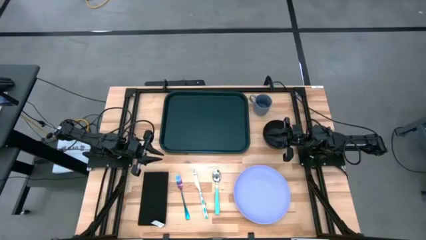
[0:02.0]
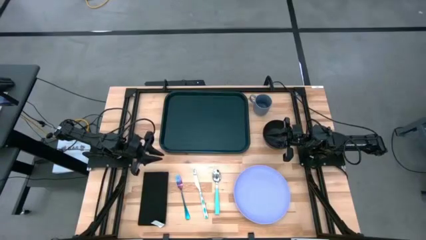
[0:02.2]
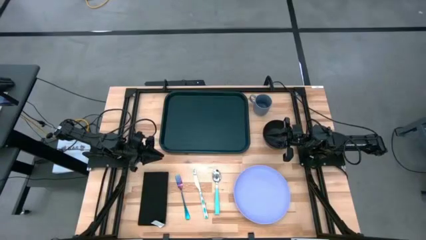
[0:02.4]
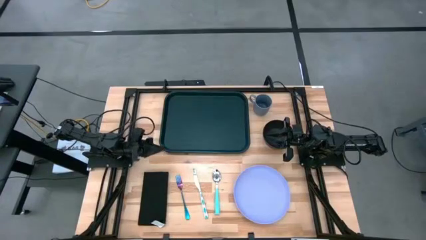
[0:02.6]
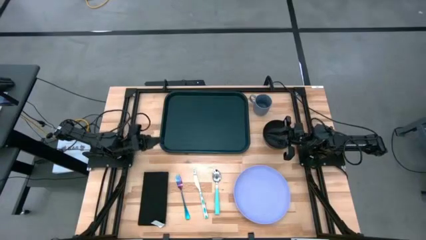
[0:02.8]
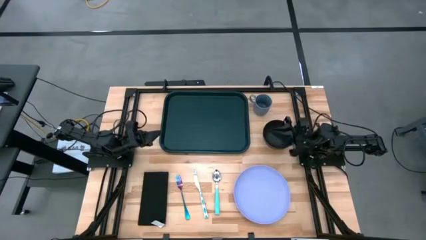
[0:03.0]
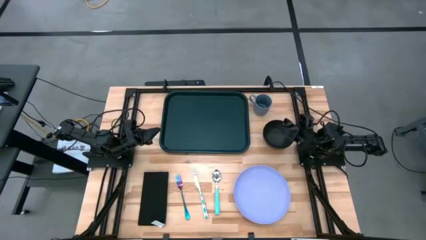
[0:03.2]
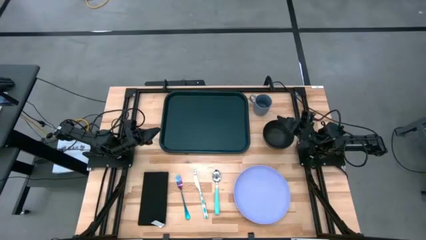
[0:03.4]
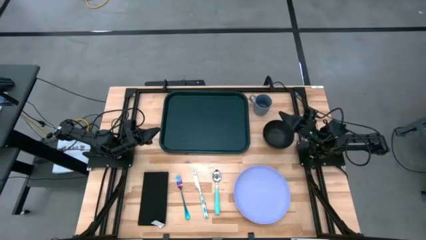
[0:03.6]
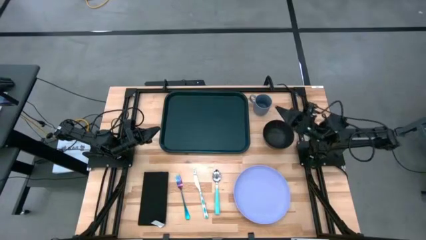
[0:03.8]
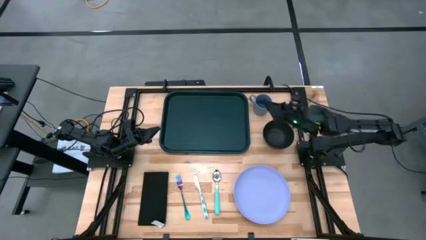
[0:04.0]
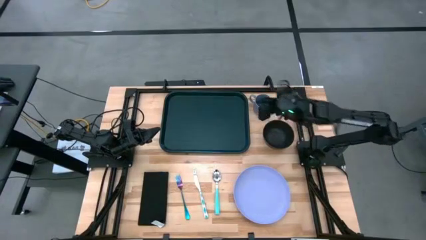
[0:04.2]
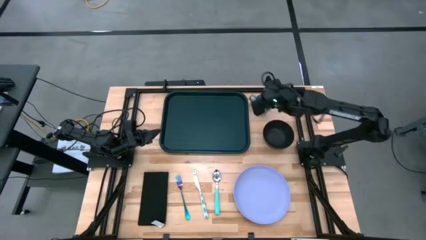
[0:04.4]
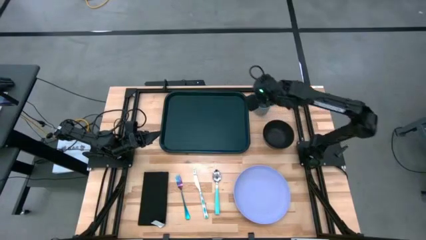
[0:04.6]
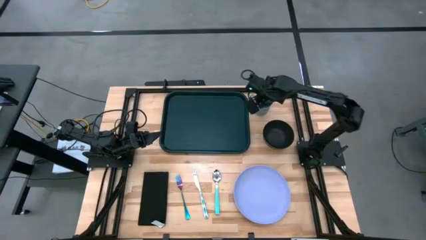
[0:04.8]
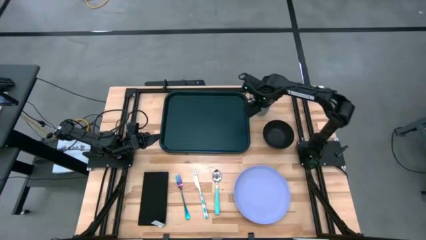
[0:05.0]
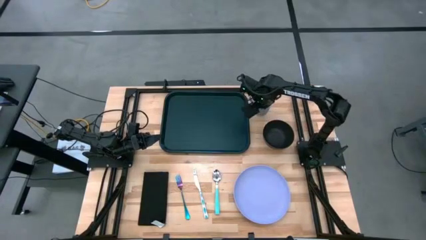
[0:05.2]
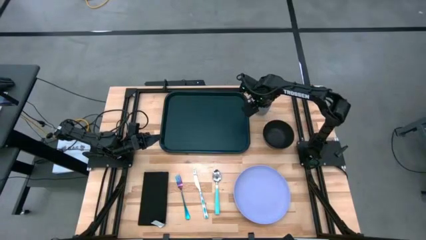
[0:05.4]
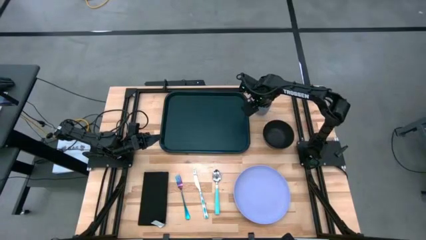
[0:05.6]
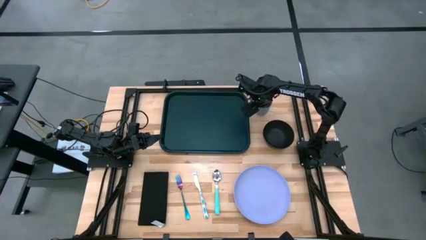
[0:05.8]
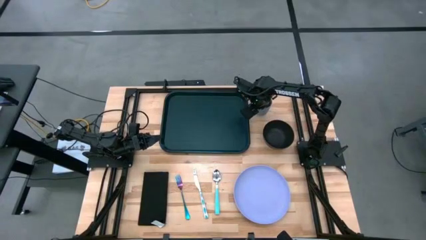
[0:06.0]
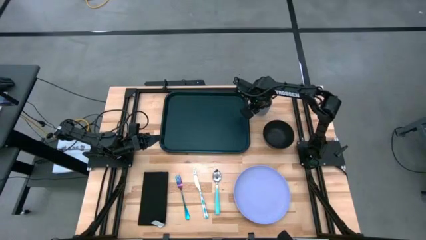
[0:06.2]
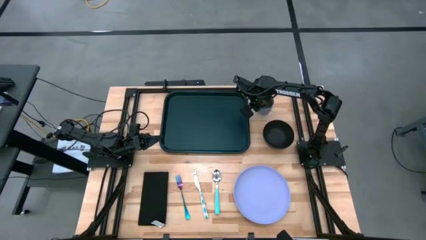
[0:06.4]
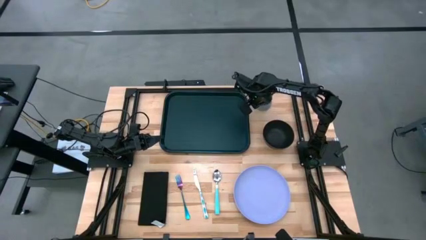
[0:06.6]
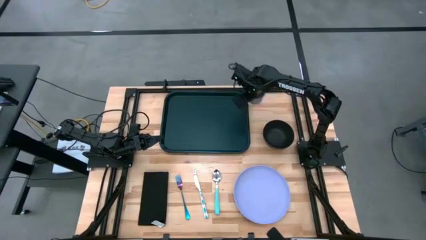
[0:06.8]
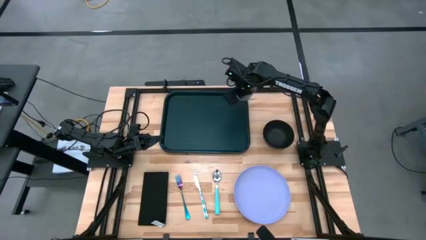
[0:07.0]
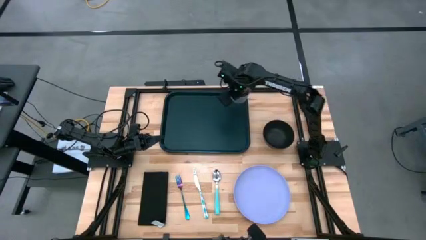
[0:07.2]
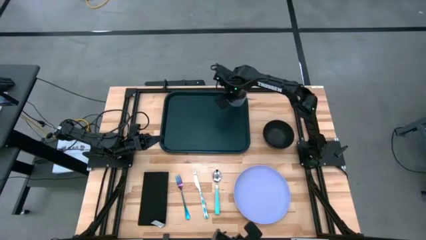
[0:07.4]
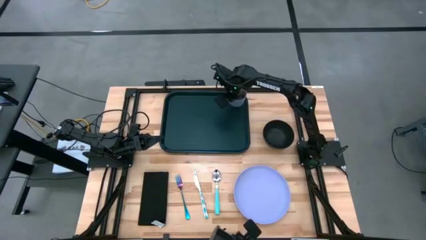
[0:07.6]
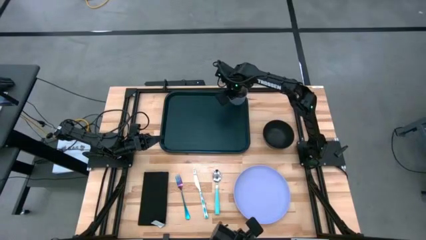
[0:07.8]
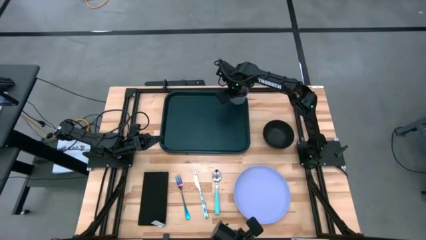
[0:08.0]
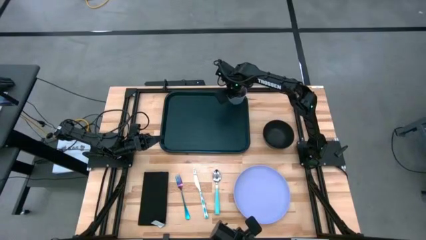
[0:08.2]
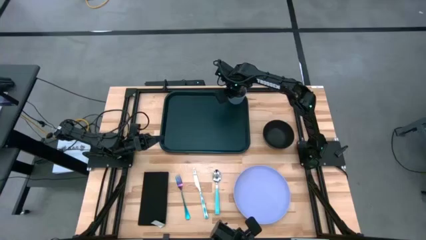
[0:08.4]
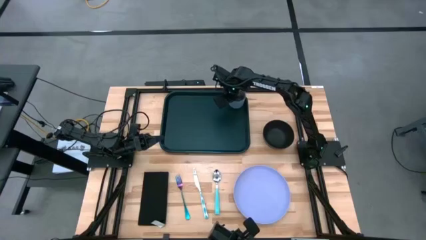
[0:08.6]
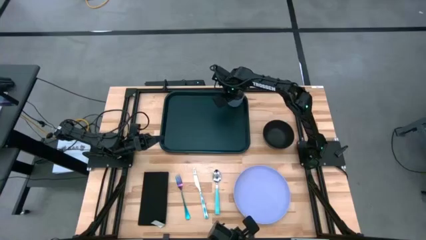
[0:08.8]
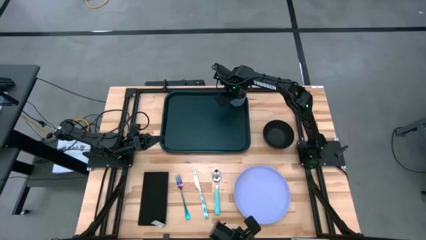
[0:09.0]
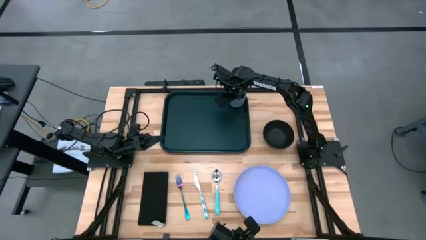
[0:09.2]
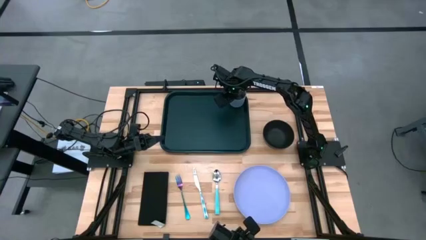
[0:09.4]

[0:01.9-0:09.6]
Task: Set up tray
Put the gray mug on the black tray

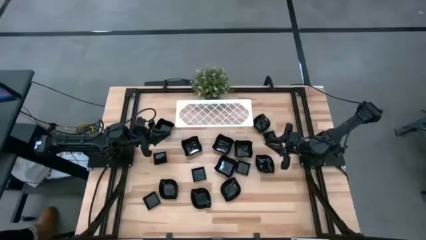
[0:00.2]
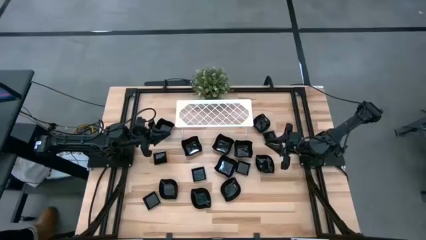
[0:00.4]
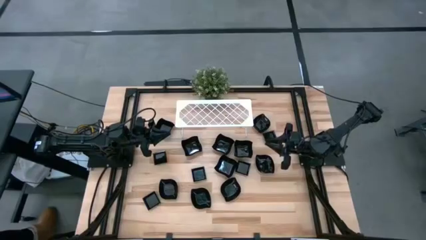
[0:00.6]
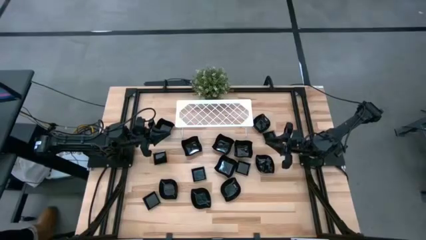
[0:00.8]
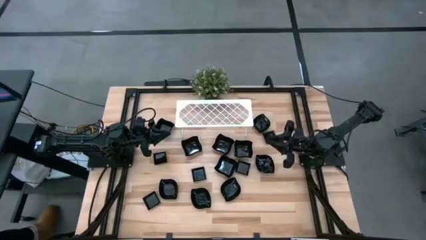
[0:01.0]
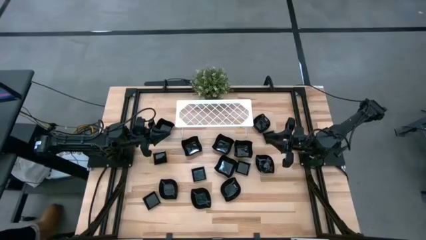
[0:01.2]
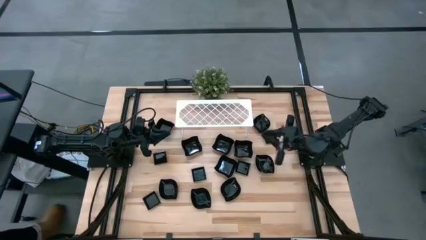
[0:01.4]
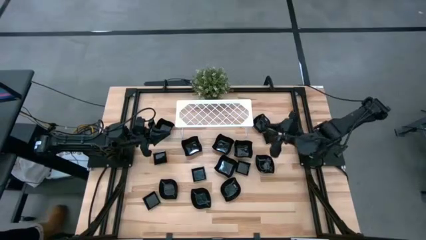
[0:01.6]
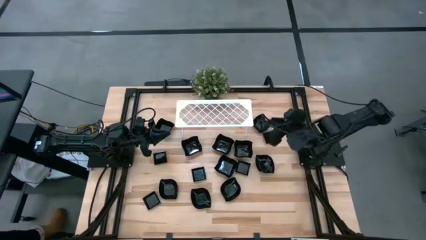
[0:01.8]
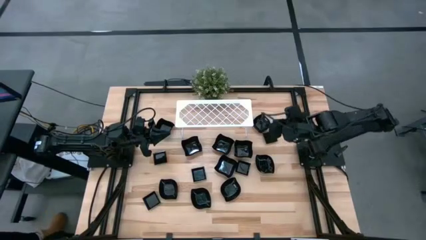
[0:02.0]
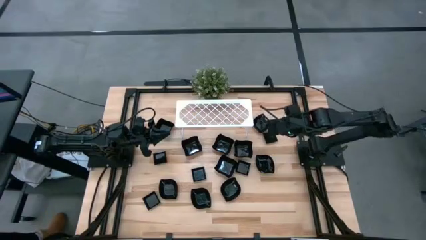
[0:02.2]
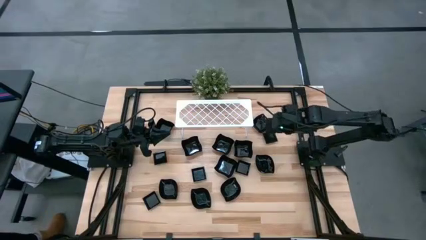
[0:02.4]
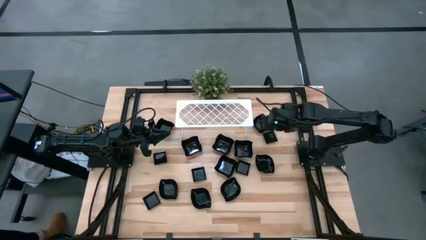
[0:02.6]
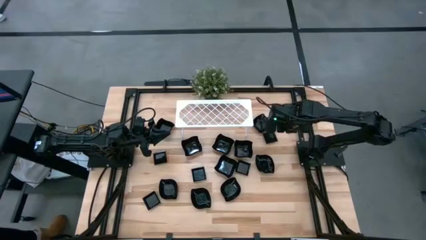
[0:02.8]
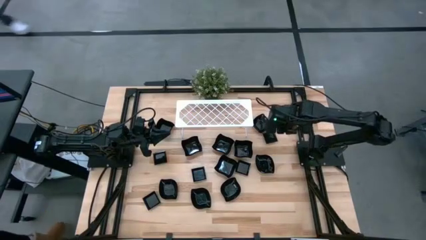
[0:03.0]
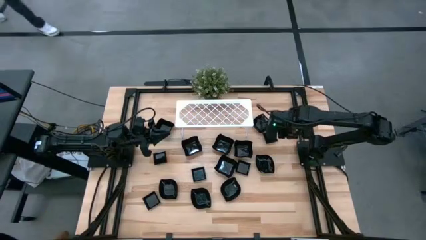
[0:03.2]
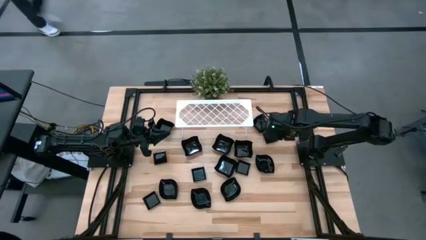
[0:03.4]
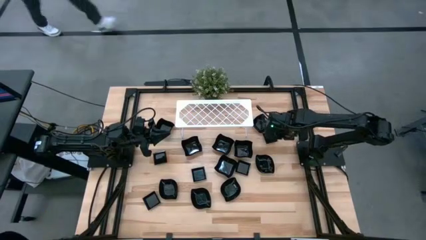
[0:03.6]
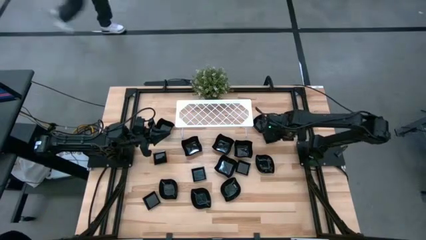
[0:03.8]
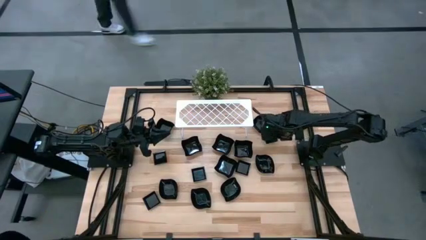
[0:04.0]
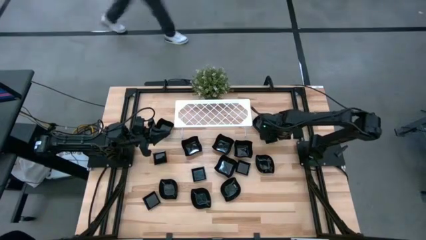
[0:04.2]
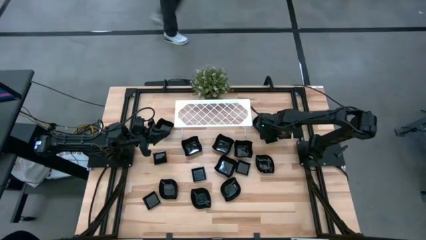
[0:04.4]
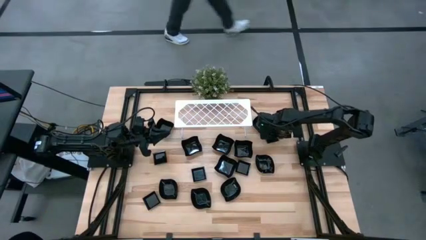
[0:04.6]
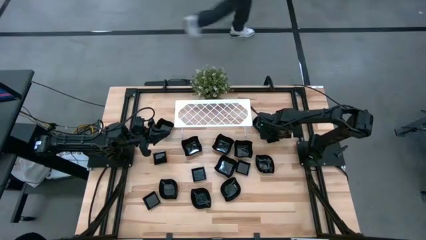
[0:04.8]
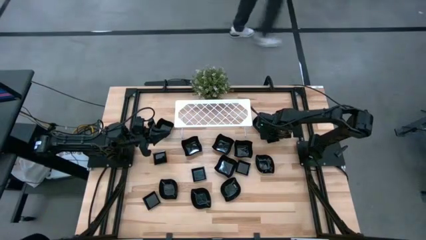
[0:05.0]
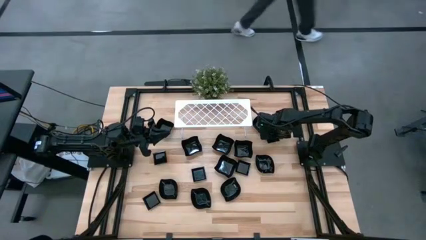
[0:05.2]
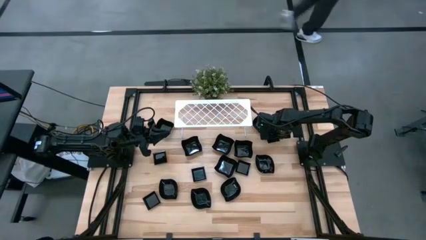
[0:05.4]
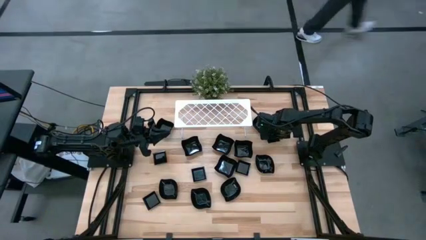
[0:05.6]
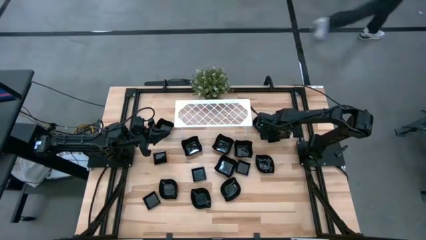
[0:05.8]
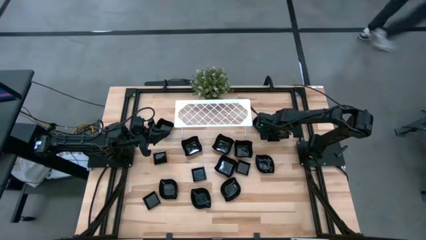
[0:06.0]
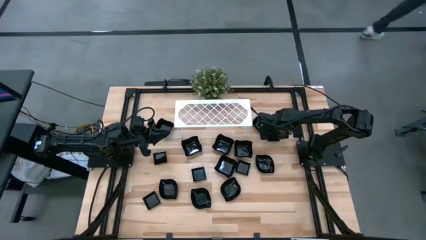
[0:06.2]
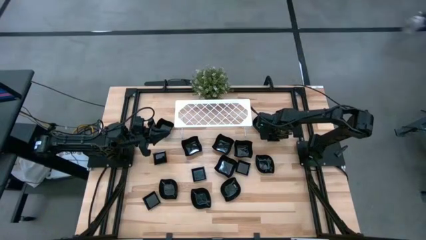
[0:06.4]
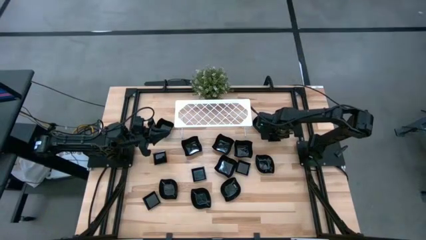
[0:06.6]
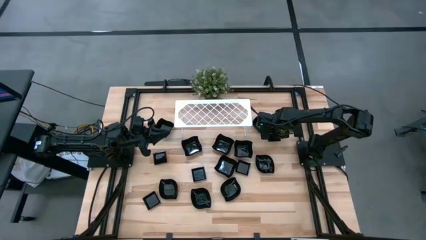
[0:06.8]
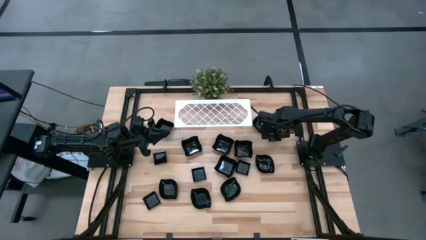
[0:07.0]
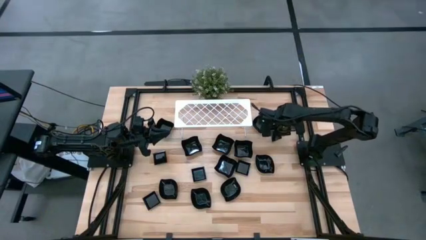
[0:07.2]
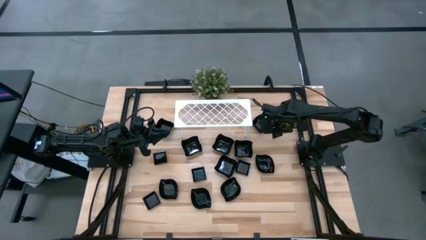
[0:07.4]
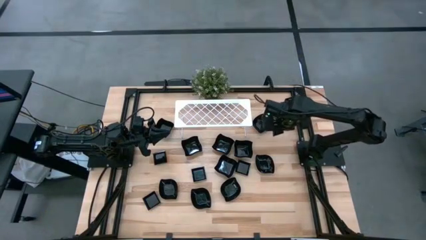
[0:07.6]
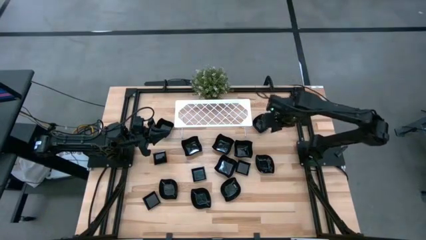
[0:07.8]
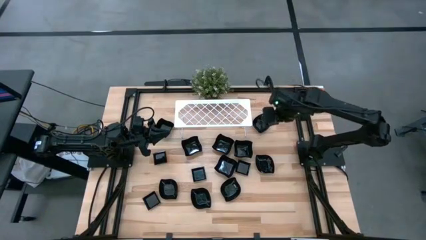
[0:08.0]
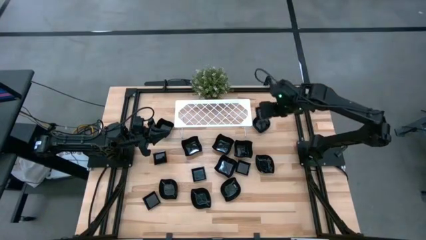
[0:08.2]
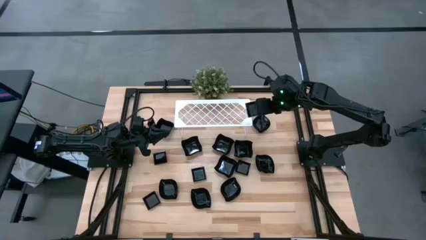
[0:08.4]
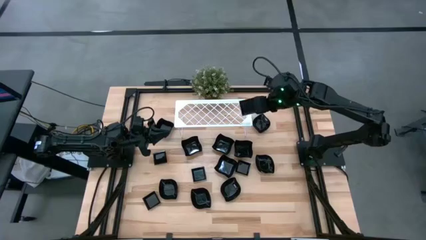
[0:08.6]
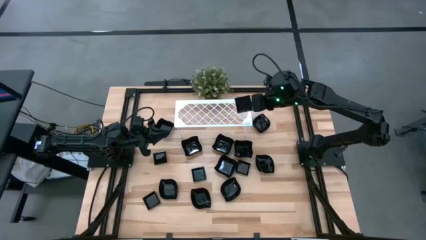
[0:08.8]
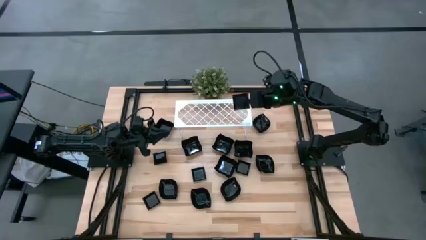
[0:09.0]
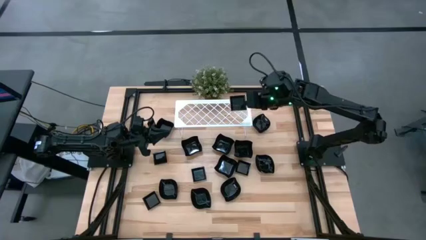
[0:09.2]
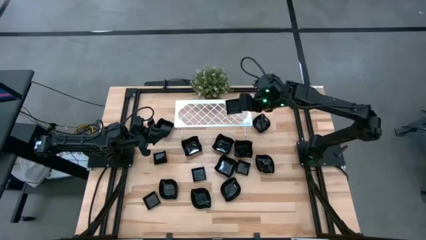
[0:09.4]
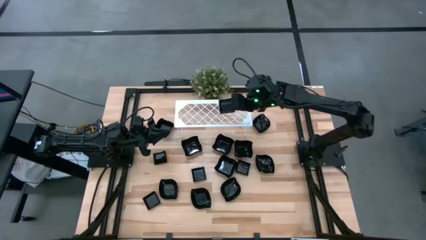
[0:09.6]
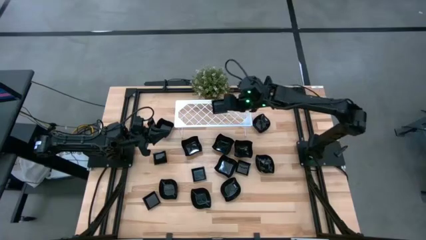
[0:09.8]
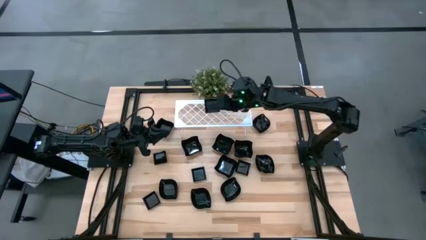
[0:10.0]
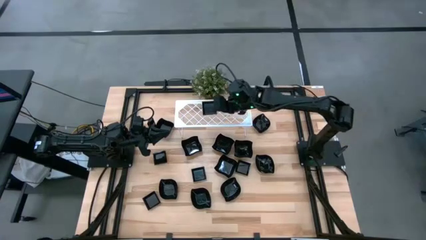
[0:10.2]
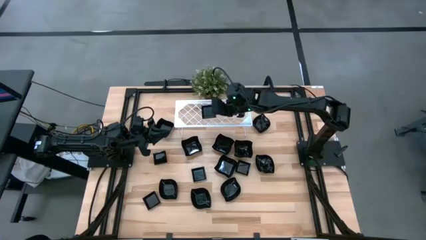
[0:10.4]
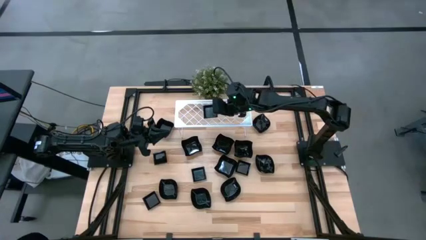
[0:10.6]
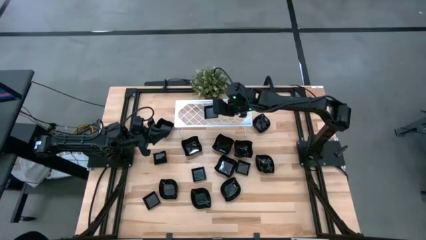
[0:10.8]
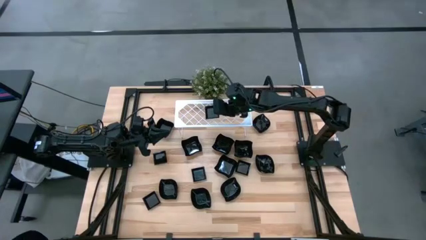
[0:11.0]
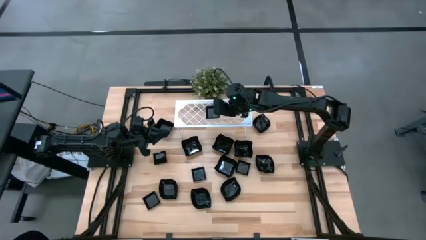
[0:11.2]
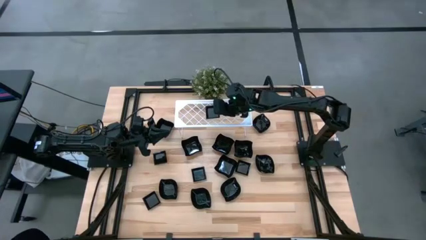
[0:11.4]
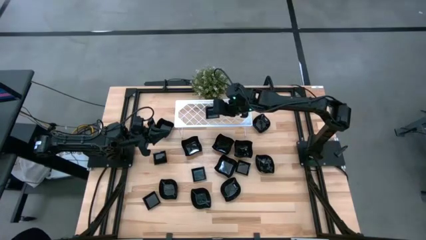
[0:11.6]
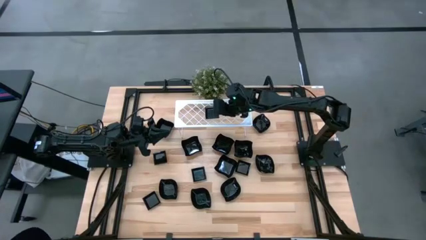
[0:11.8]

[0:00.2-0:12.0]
Task: Pick & Place Mini shaped plates
Put the square plate on the shelf
